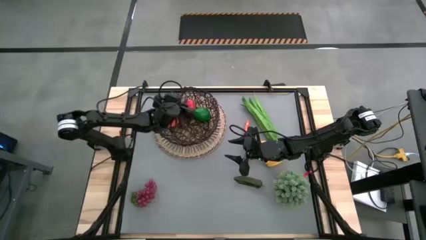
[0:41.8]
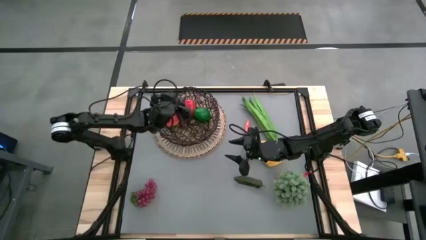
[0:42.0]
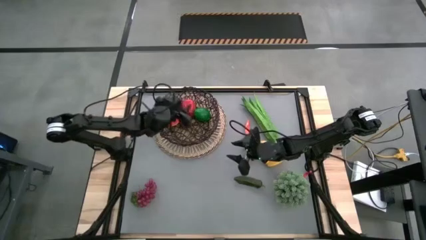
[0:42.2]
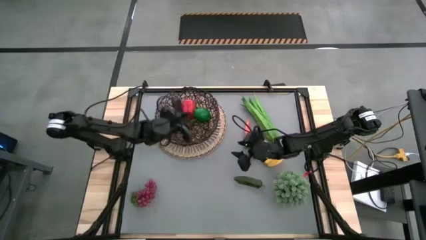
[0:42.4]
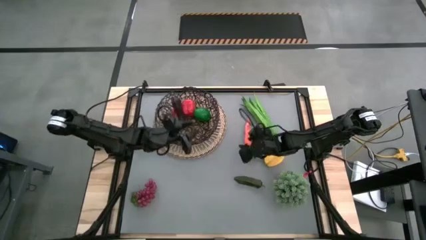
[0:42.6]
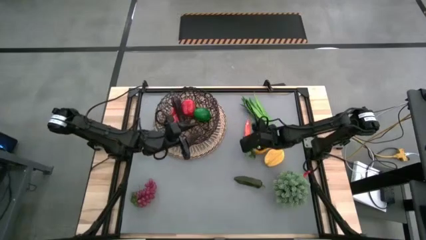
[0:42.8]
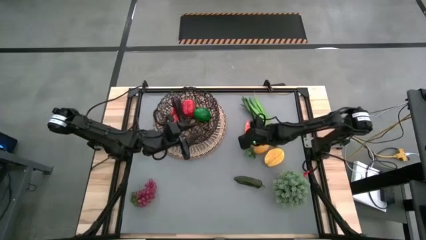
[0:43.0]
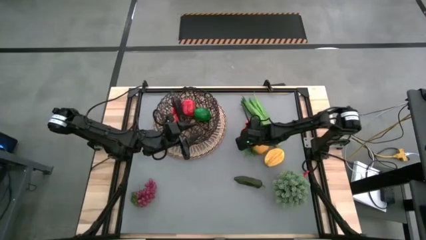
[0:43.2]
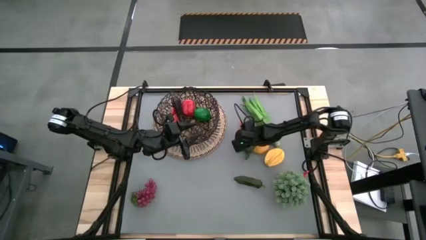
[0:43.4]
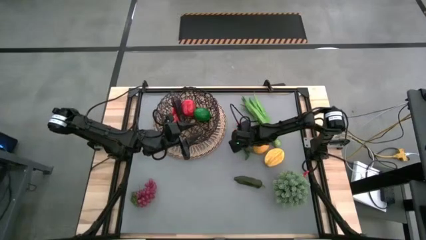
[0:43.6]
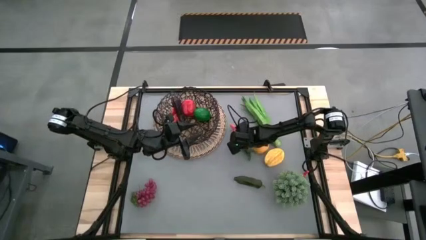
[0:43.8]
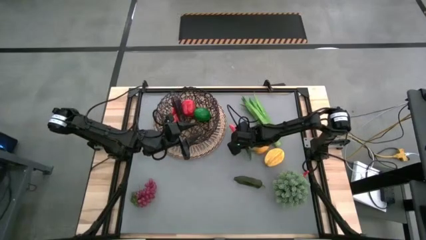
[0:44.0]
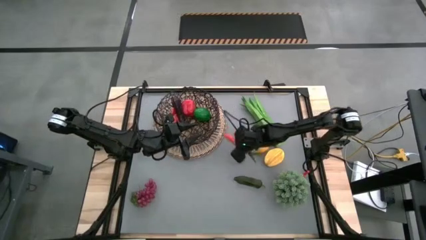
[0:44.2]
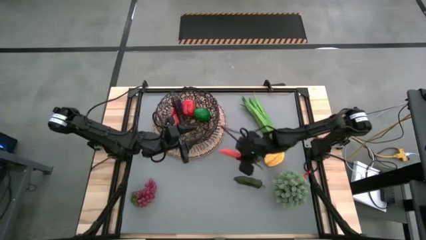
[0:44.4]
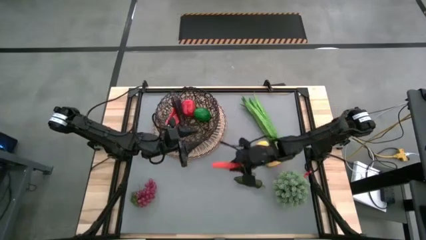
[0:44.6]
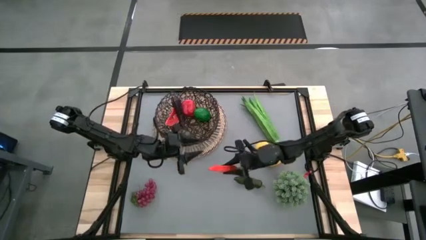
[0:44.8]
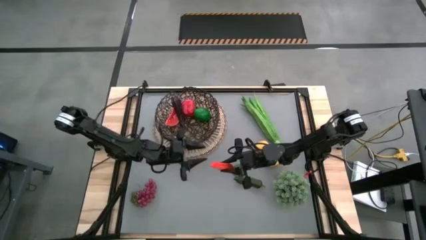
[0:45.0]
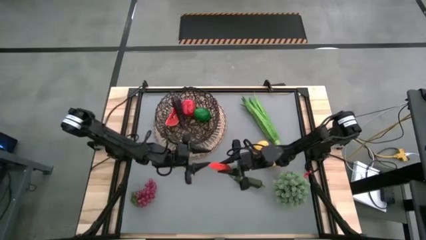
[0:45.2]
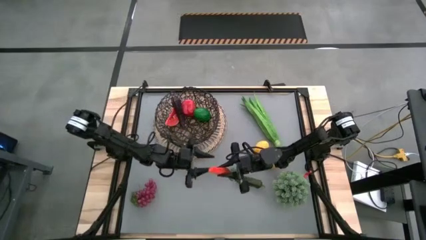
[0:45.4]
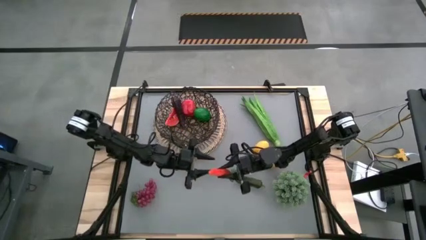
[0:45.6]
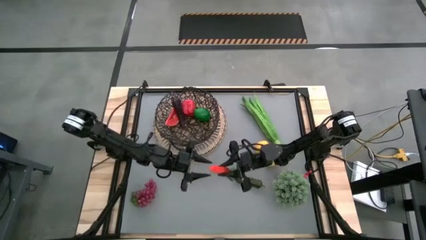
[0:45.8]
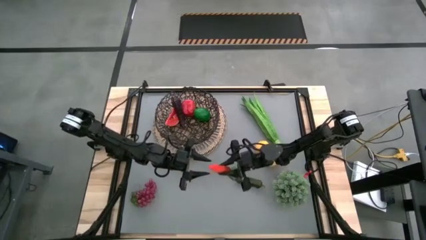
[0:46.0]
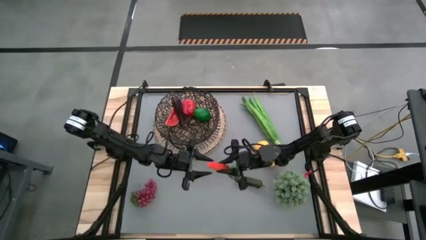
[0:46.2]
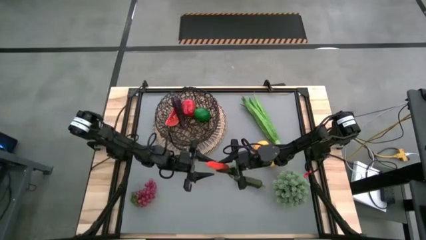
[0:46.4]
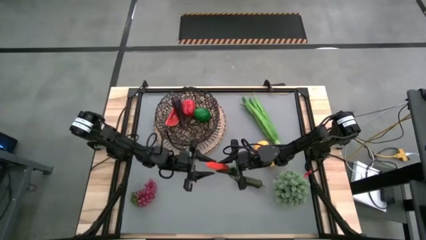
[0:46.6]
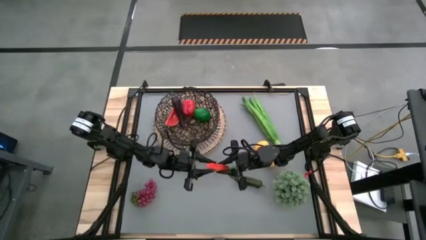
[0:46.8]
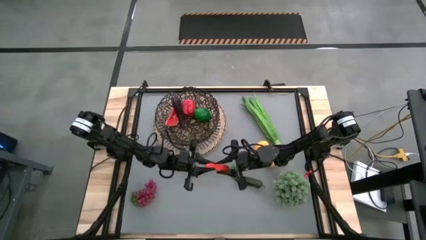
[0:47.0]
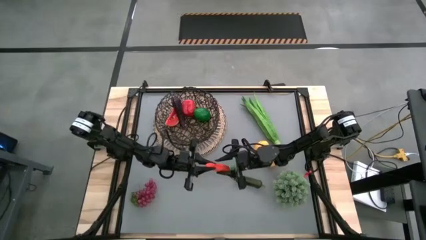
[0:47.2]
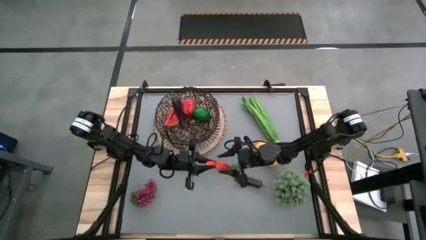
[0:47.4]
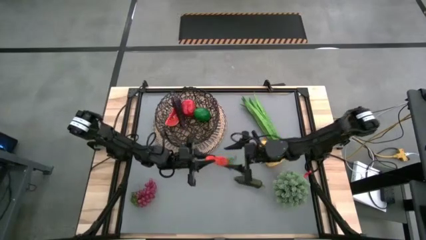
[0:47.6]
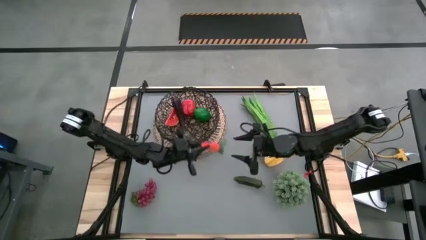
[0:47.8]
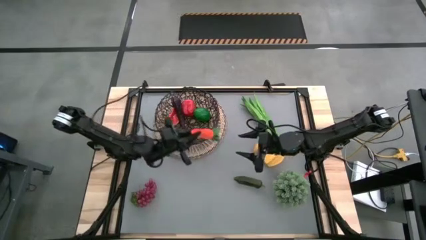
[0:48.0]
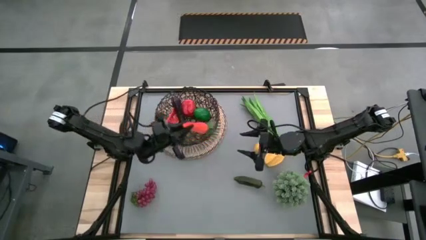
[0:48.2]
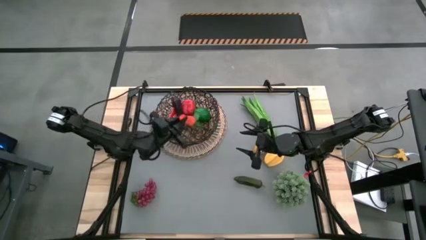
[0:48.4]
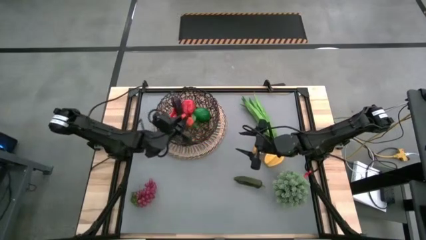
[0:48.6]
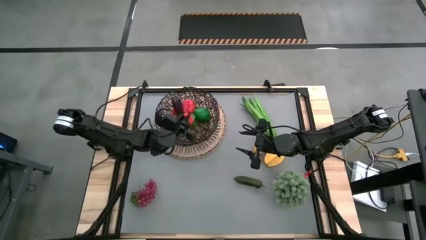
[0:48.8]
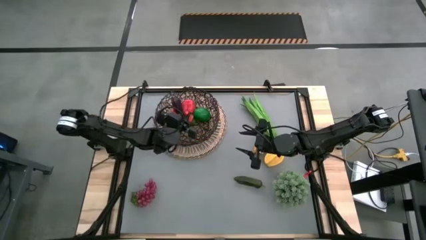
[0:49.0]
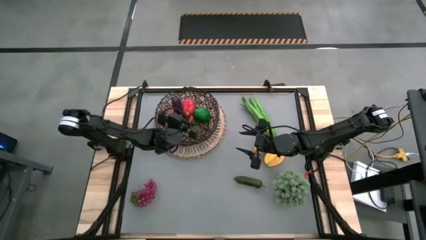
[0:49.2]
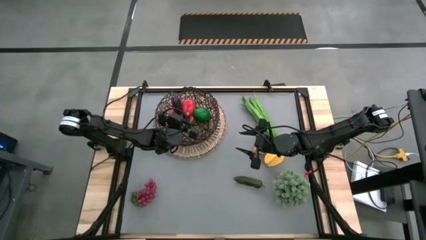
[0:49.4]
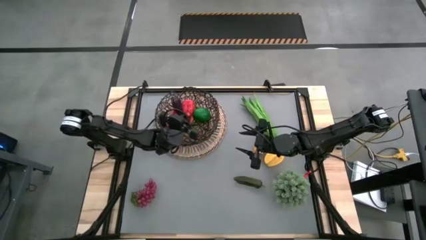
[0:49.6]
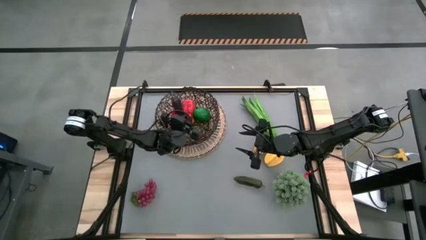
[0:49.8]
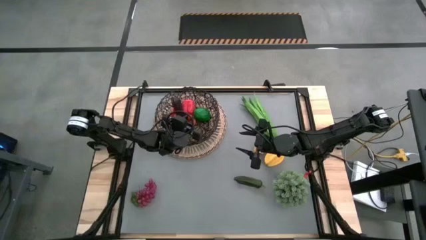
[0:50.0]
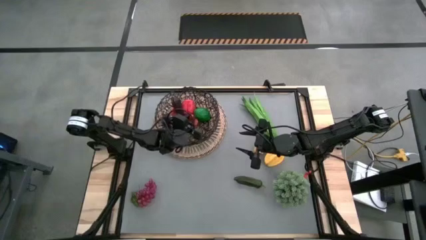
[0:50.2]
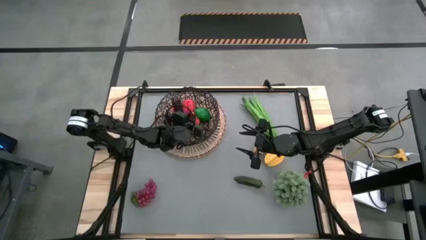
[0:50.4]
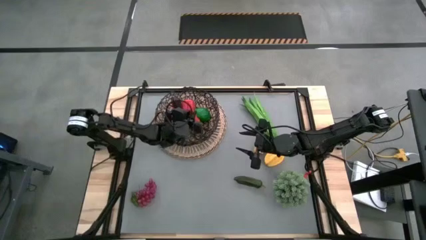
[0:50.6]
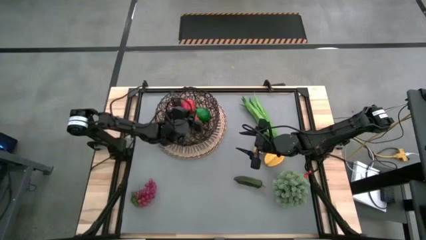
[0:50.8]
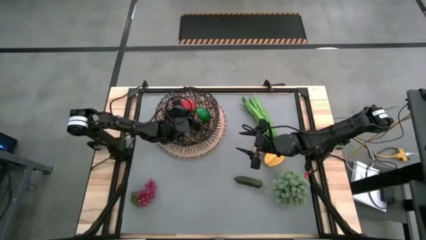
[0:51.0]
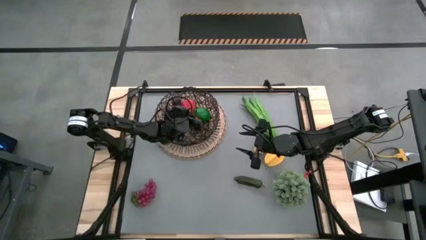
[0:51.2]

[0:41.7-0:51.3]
Task: Build produce basket
Put the orange carrot into the black wire basket

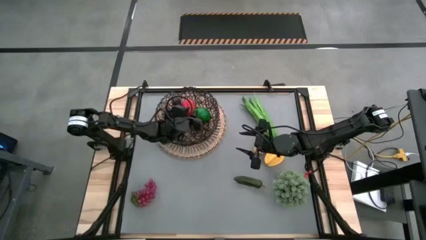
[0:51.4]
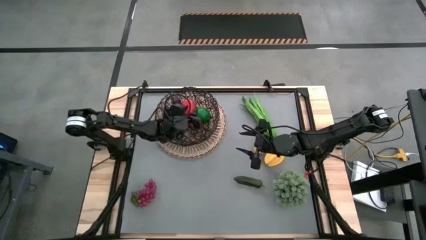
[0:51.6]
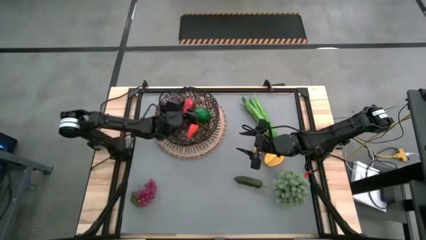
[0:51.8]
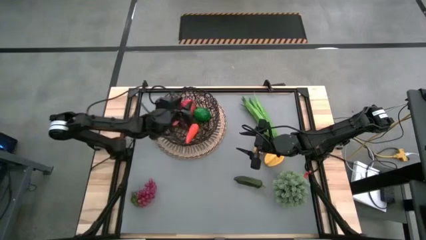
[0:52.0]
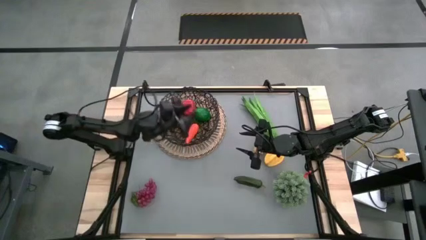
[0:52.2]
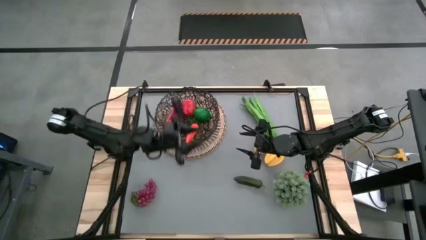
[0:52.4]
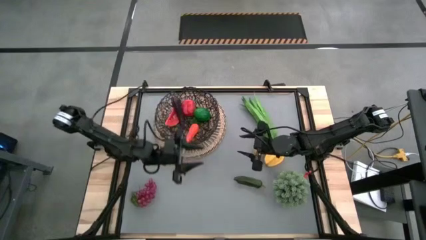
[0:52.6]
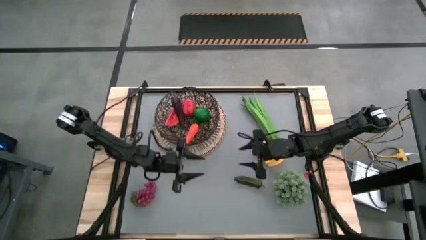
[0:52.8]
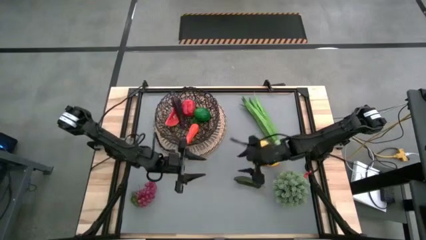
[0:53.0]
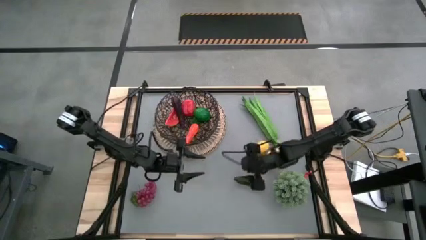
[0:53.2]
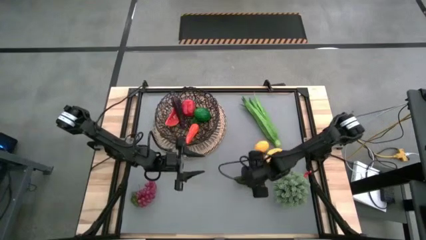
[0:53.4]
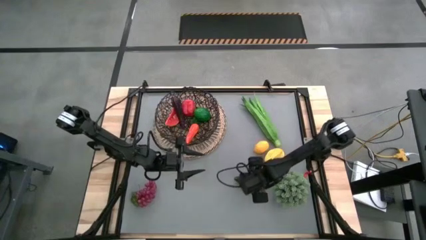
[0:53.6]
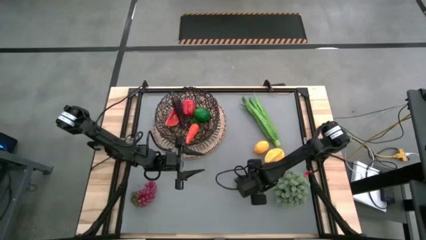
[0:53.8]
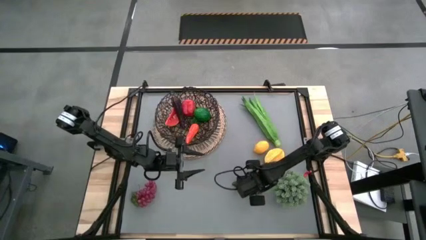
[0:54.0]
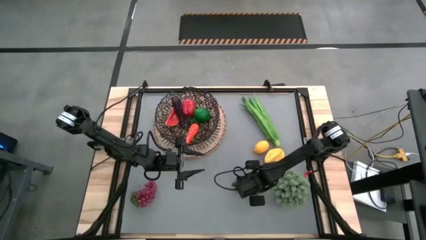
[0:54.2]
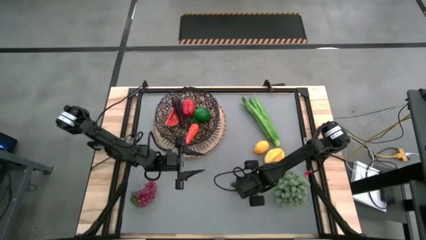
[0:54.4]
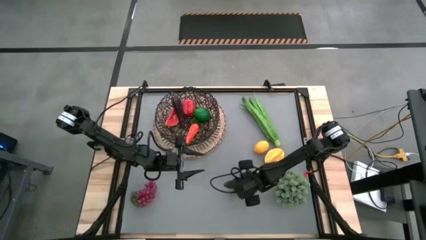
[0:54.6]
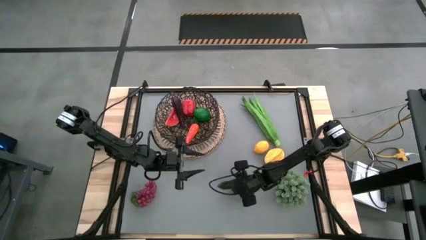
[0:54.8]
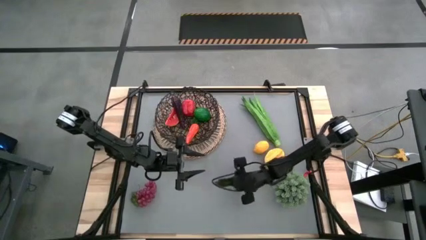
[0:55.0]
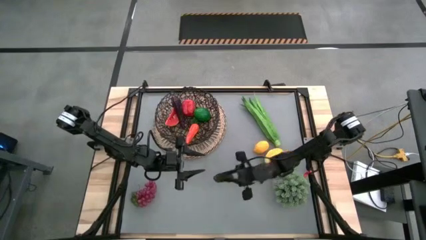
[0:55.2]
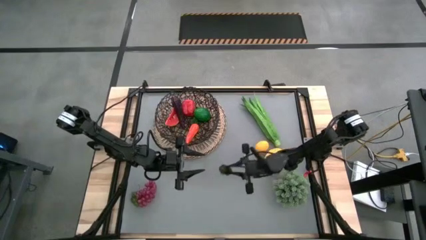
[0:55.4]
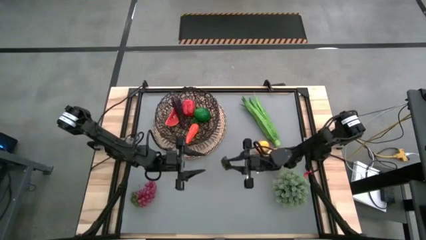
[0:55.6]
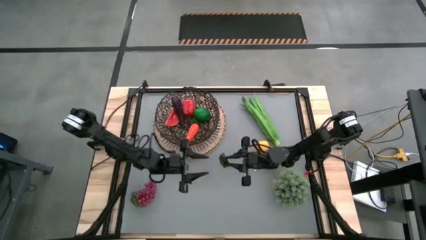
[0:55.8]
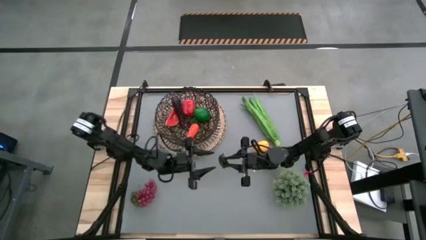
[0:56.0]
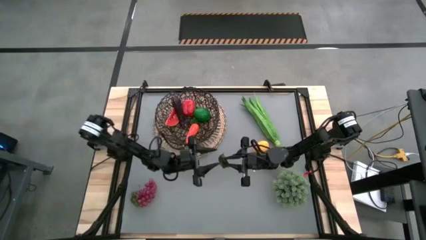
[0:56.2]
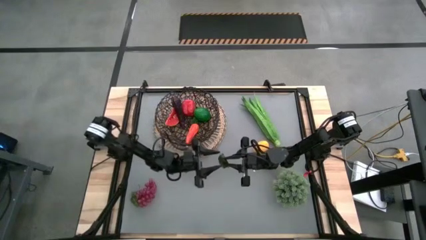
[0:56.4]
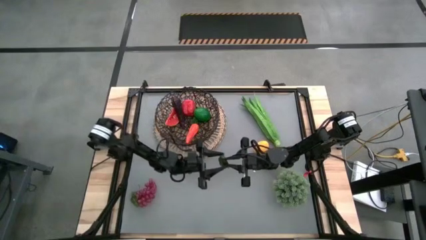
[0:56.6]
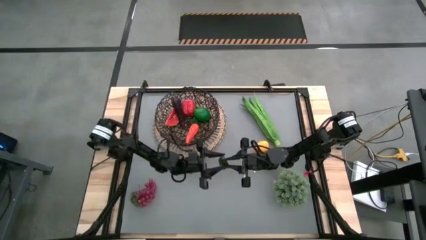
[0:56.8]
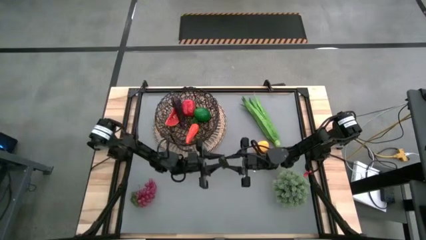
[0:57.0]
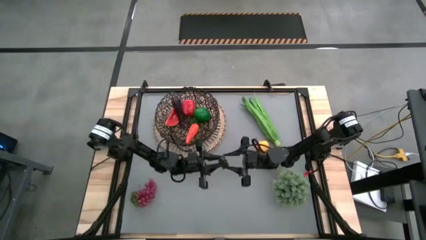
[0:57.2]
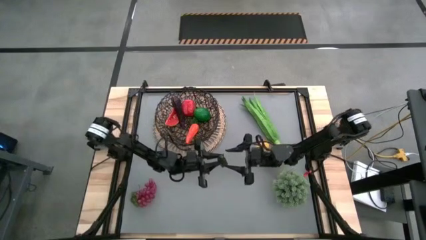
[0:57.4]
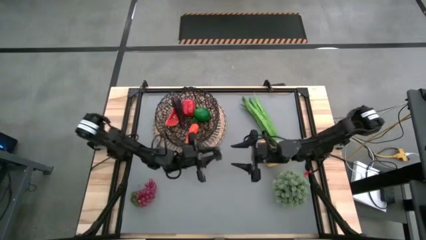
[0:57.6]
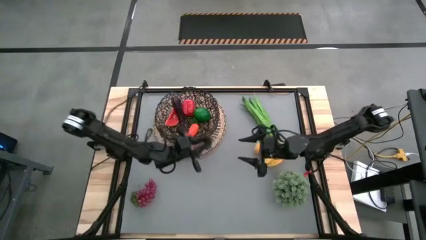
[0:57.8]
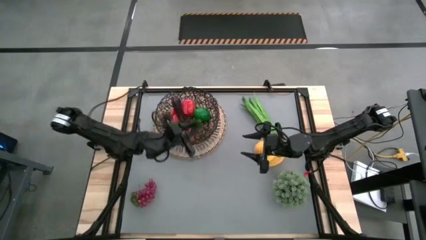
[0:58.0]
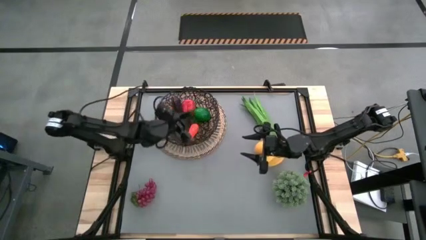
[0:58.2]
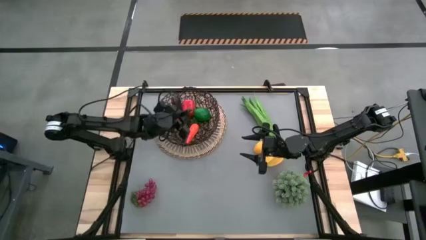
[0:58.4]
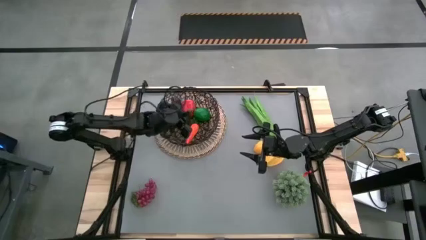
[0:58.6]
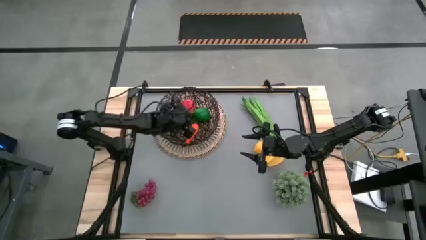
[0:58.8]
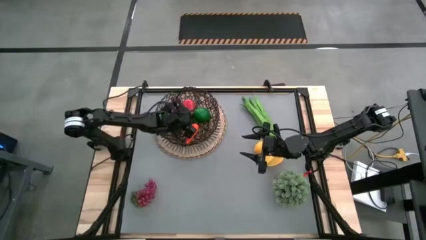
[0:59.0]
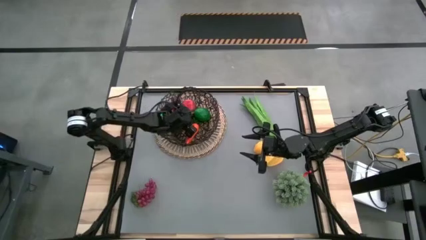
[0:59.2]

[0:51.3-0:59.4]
Put the green chili pepper into the black wire basket
